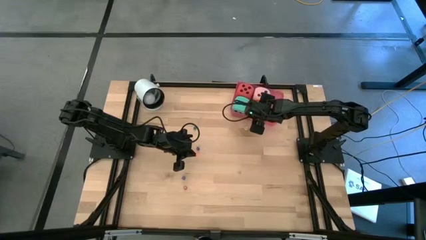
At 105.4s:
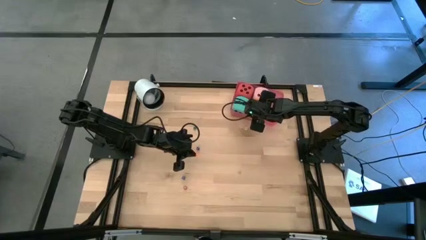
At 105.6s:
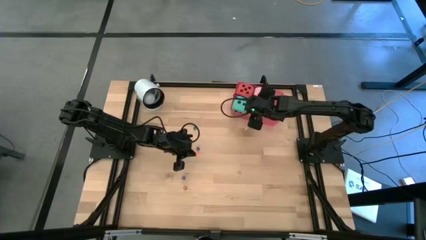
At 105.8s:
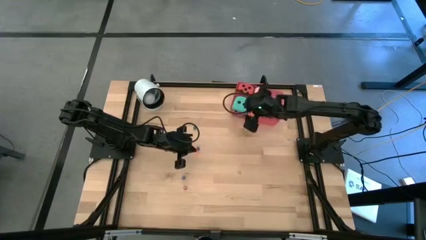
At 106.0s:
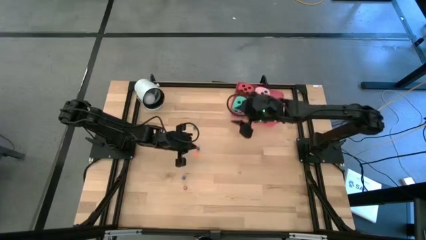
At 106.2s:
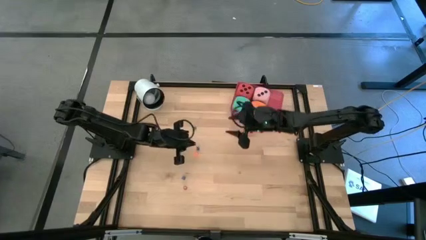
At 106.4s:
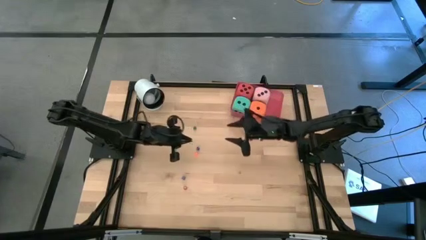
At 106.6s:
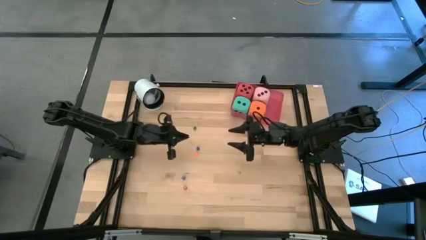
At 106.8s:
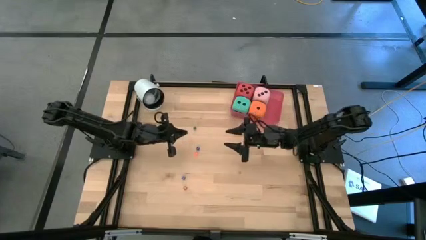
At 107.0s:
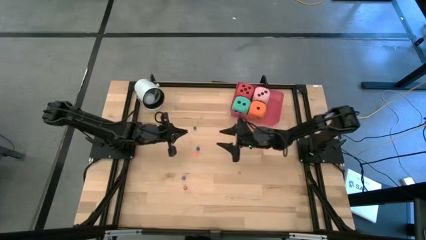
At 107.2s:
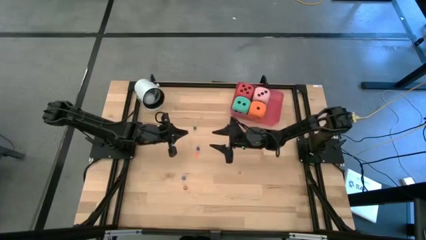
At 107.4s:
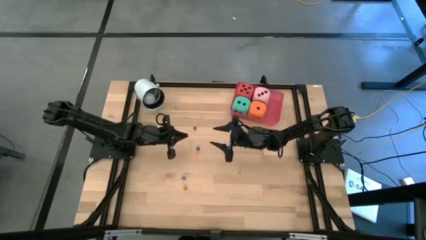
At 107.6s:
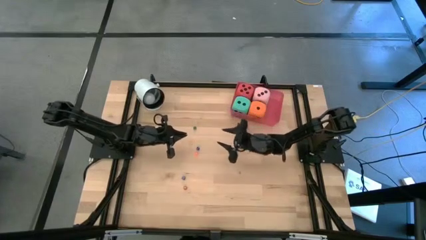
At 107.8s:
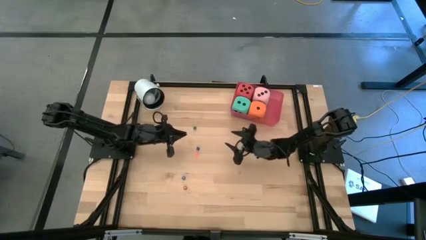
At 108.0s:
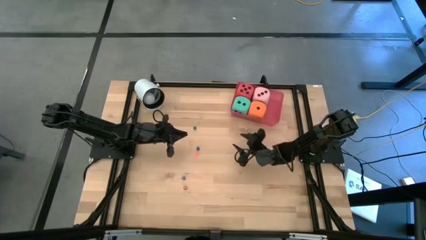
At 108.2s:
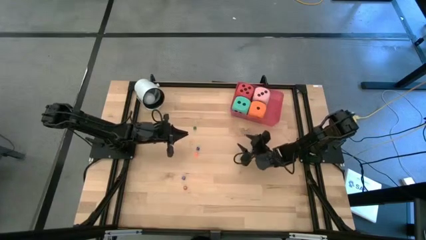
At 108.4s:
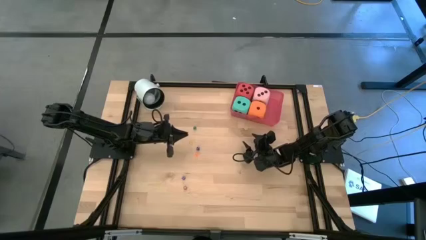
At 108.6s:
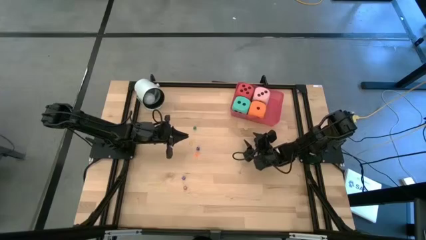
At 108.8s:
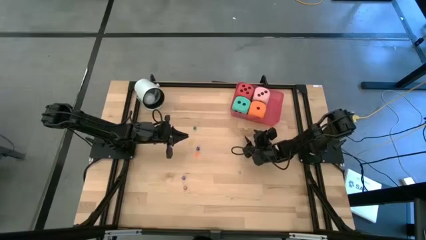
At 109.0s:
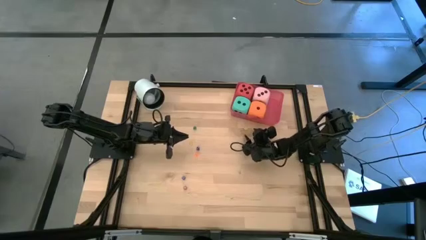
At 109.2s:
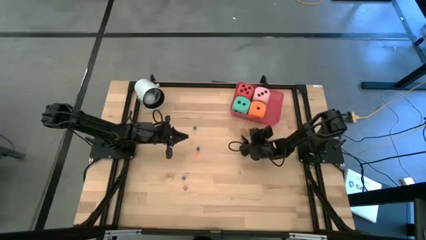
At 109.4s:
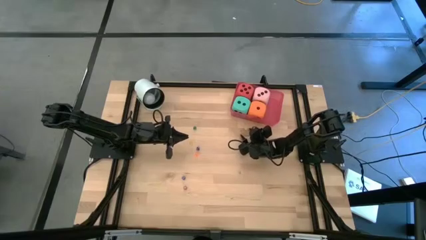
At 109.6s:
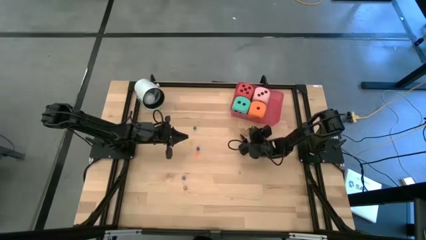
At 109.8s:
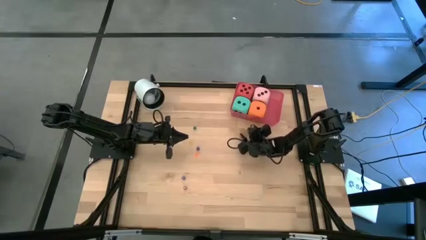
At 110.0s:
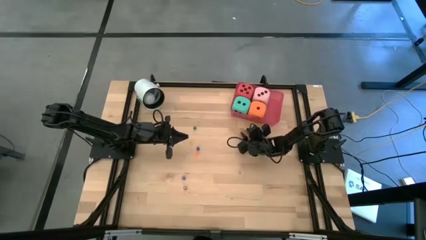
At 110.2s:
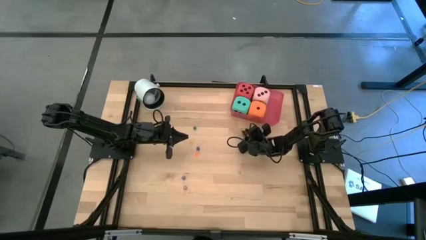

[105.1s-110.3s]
Task: Pick & Place Dice
Put the small light green dice into the red bin

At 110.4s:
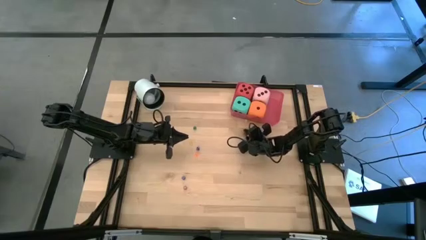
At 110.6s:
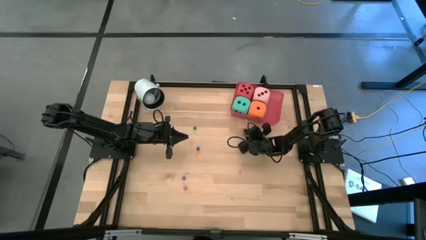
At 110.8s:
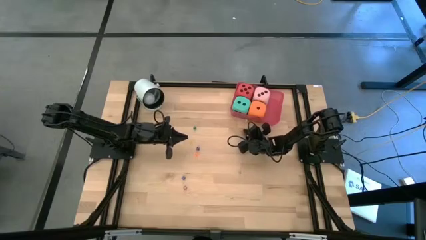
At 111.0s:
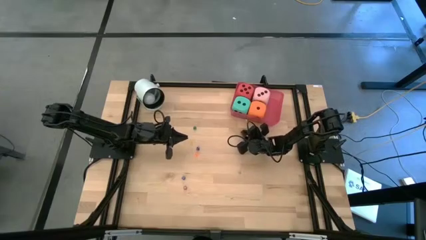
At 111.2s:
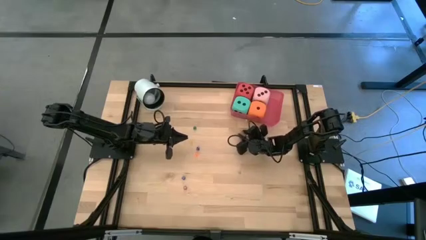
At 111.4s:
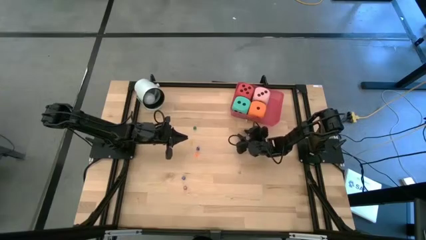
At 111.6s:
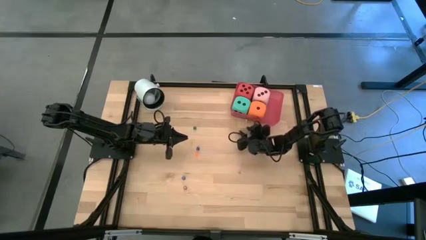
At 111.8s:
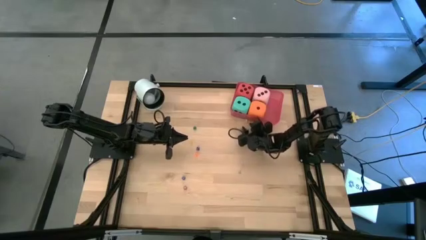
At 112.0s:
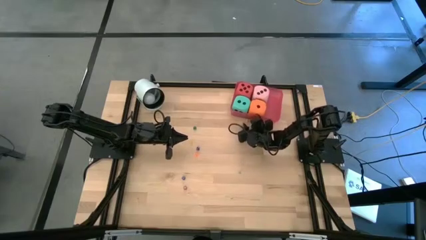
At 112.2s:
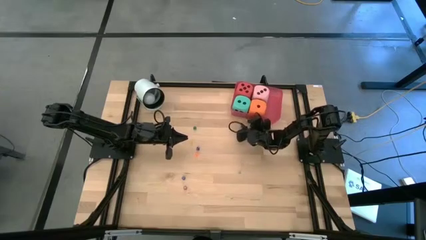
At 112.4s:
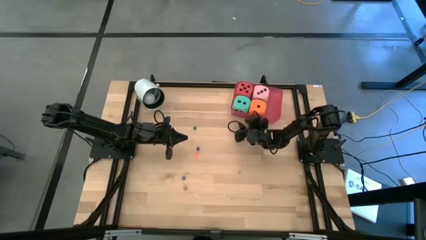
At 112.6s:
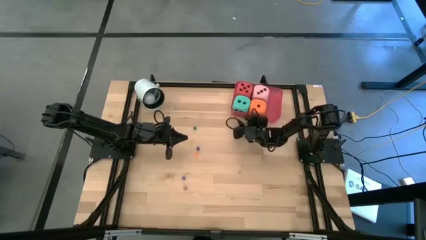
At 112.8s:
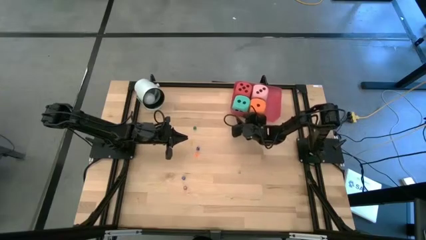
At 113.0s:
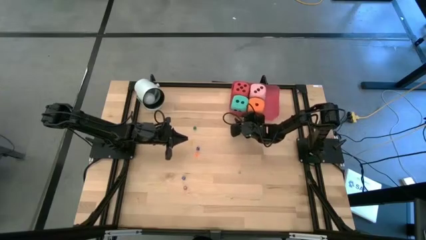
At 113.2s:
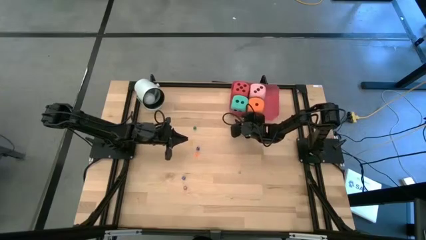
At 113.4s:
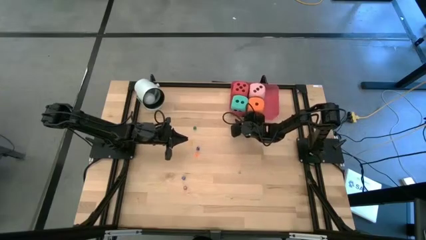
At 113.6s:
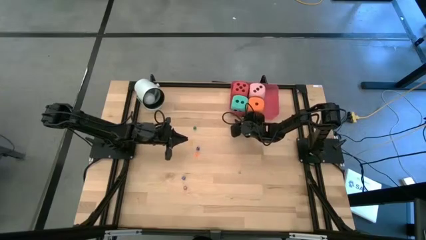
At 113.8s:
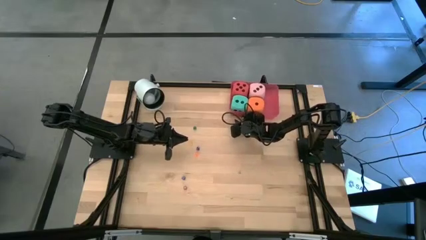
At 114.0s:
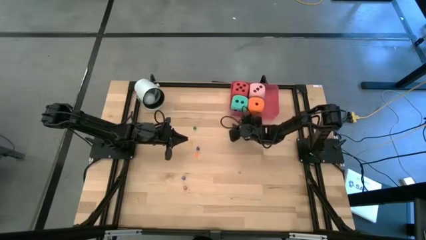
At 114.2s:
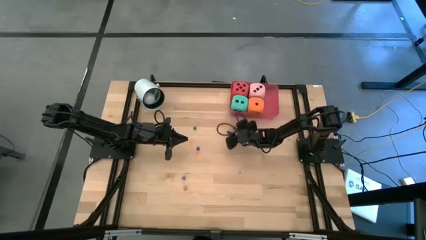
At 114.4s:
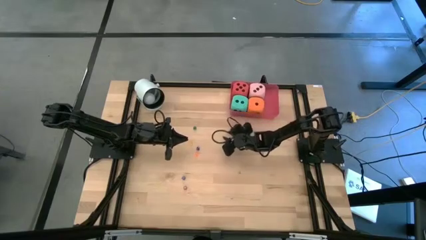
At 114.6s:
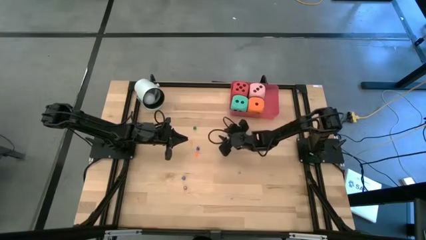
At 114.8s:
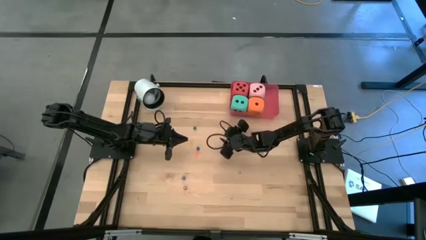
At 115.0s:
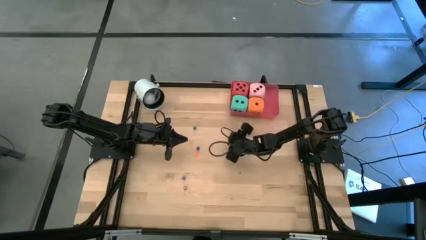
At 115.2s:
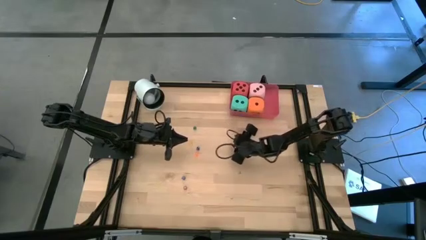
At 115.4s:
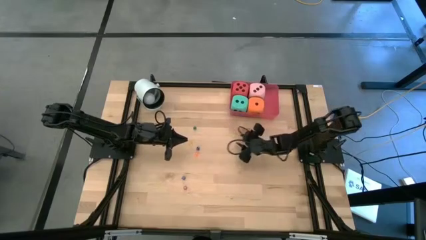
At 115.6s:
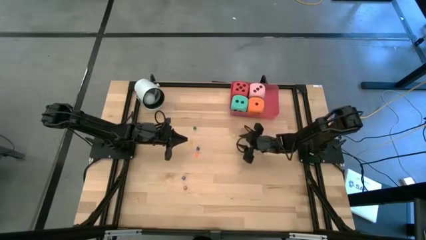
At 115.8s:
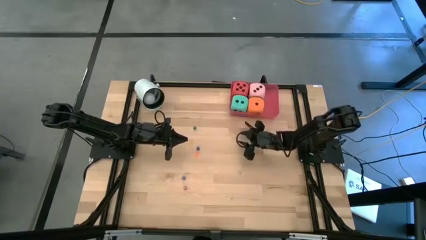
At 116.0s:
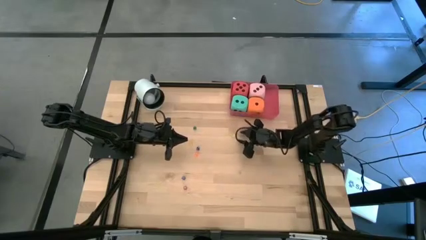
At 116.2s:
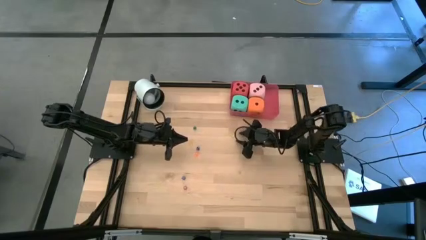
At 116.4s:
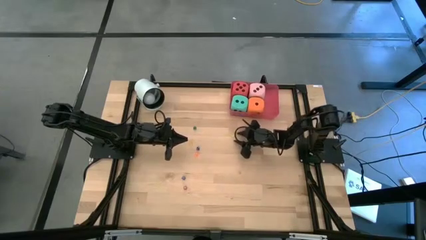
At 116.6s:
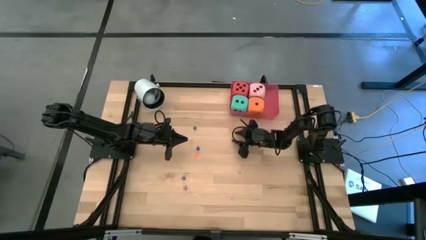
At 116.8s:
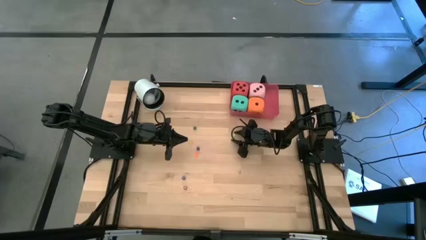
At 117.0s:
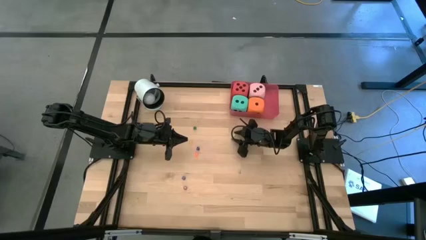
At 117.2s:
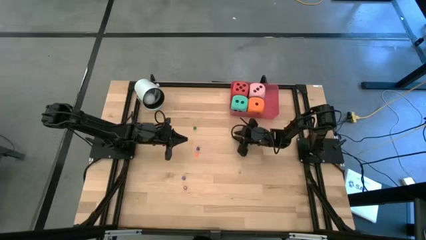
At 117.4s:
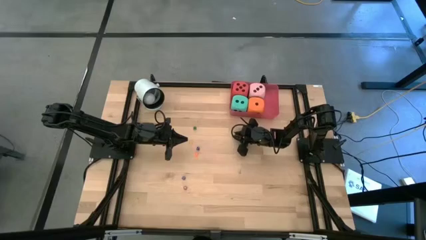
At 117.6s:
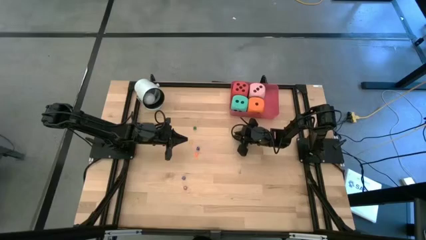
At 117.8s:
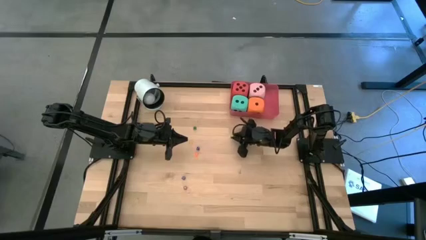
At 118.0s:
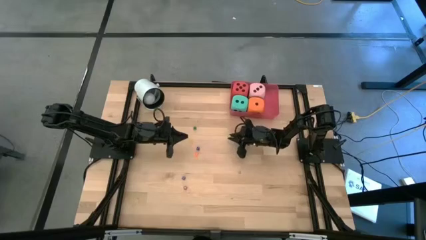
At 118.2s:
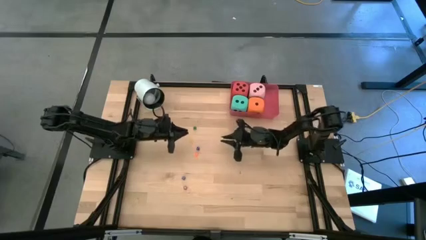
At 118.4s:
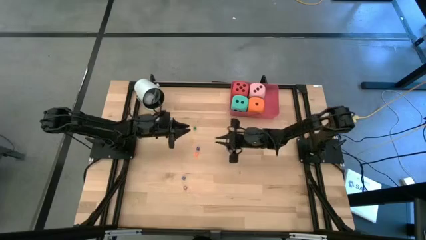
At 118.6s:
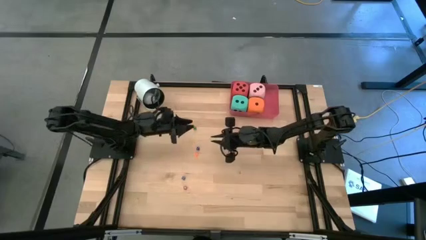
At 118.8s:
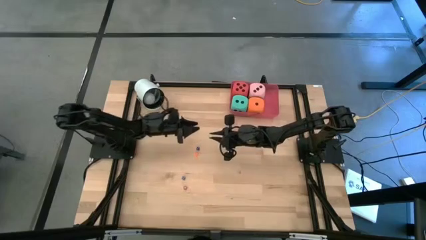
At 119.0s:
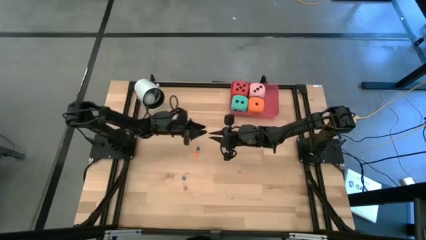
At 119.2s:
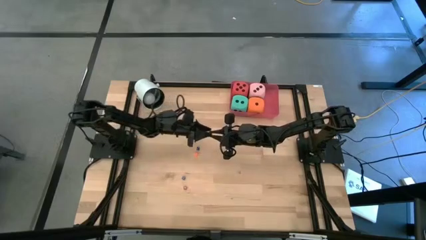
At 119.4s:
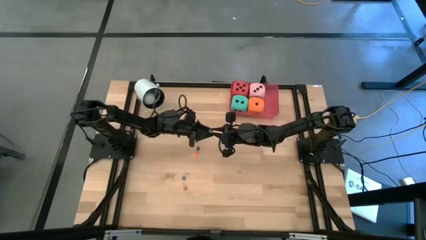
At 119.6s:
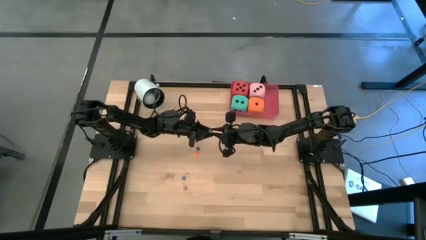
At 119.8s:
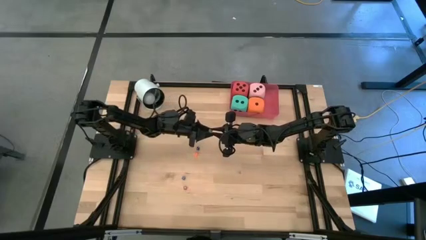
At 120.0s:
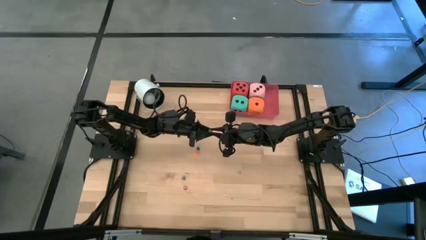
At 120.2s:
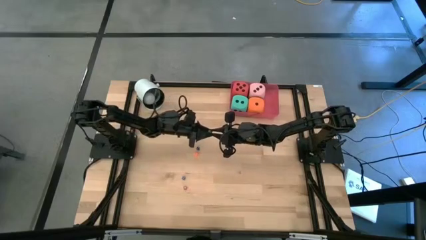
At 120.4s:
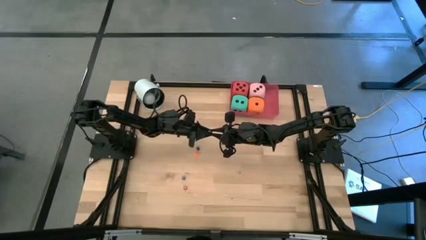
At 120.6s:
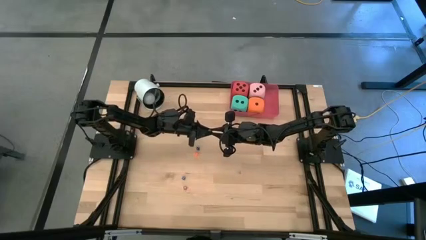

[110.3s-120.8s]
Put the small light green dice into the red bin
